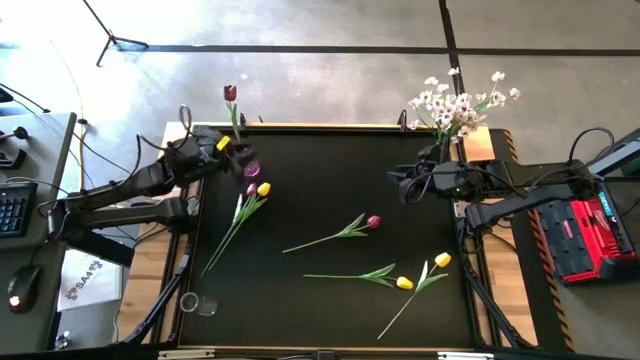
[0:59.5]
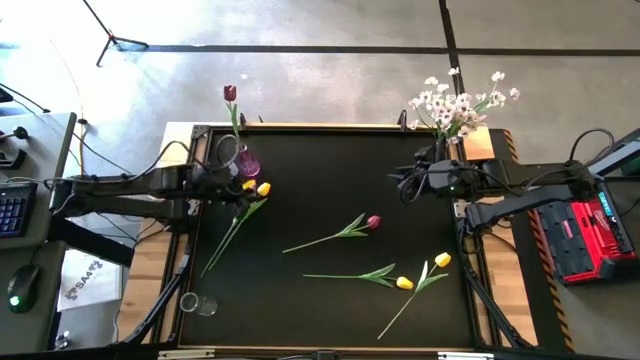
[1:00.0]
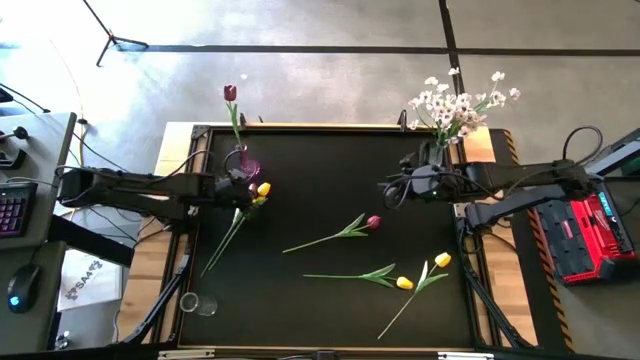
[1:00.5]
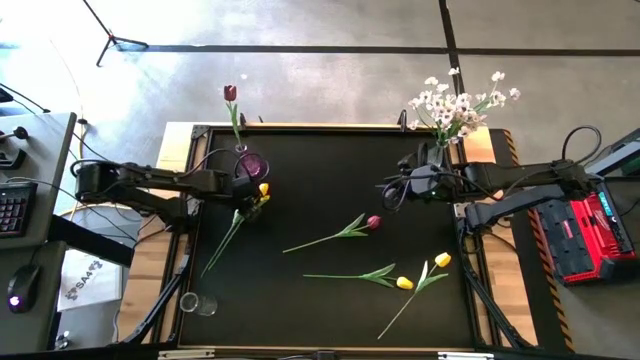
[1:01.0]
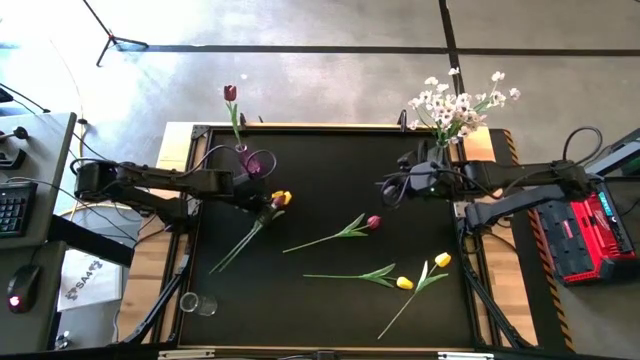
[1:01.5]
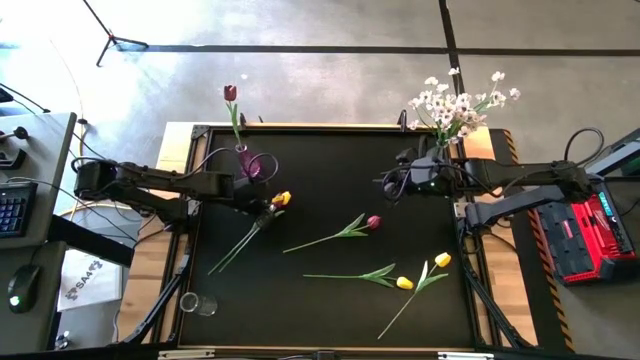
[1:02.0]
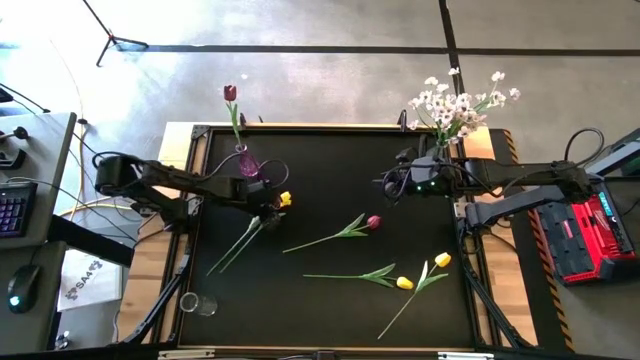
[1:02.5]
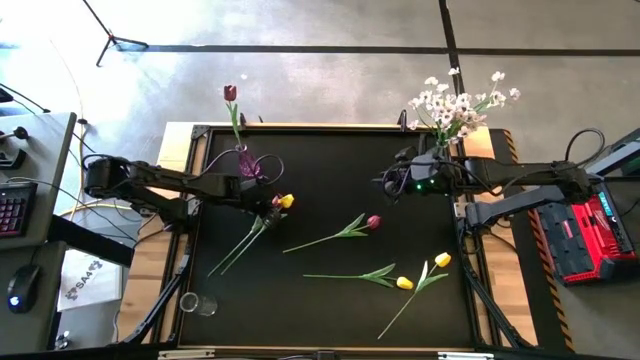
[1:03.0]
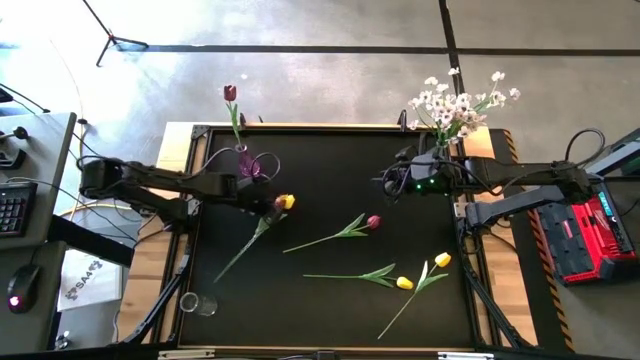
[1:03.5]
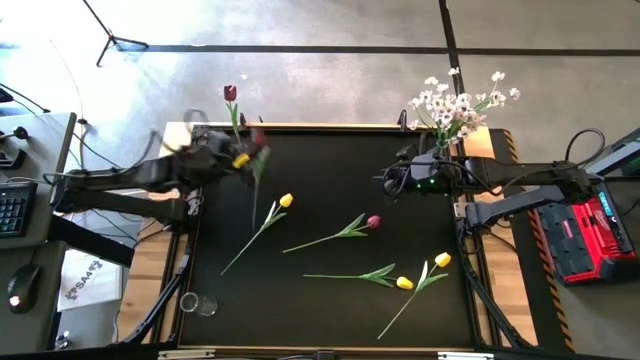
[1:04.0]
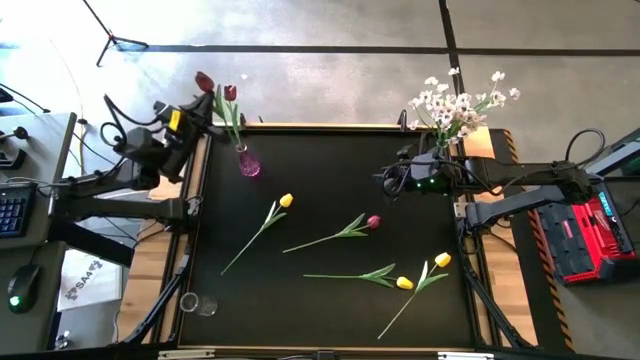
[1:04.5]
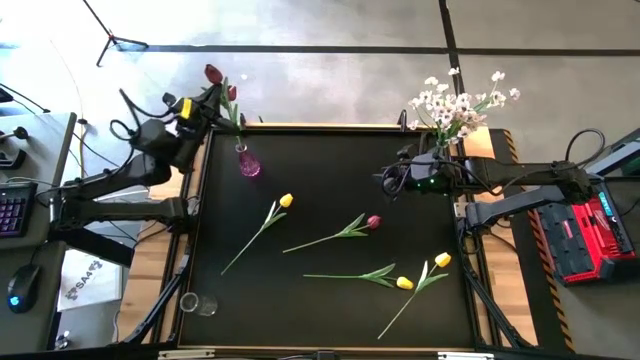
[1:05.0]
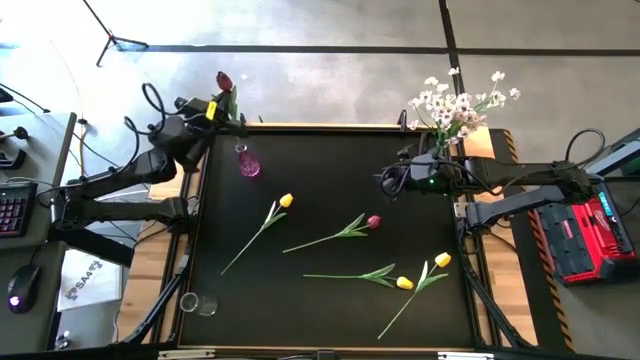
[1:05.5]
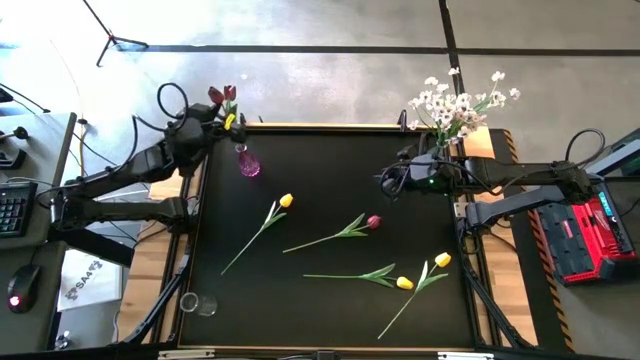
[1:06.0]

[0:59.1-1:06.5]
Task: Sort flowers into vase by color
Put the left maroon tulip flower into the top left purple vase

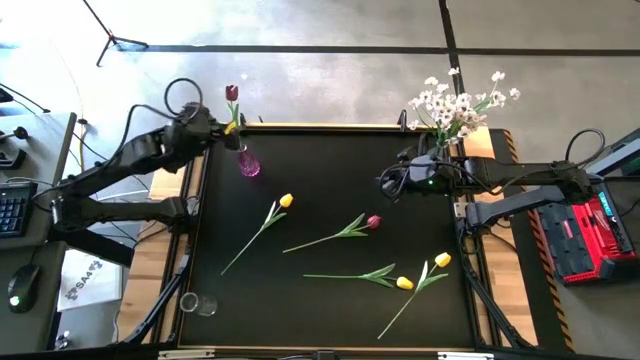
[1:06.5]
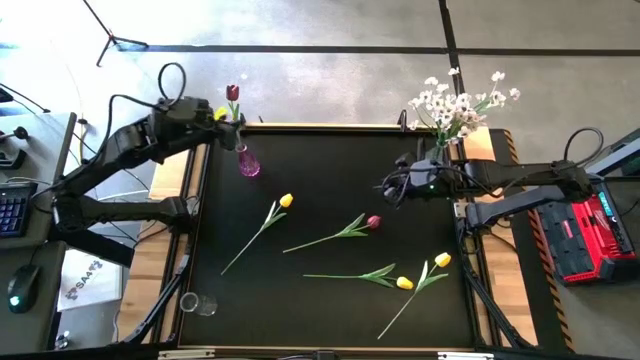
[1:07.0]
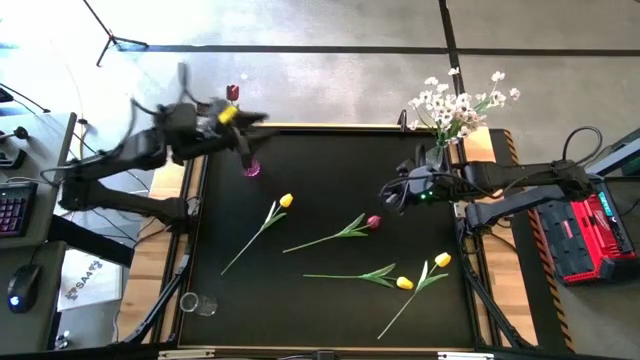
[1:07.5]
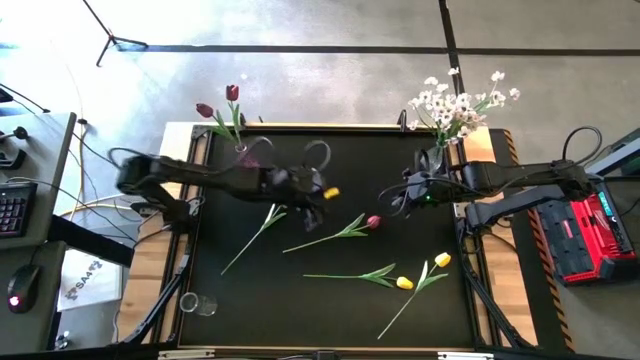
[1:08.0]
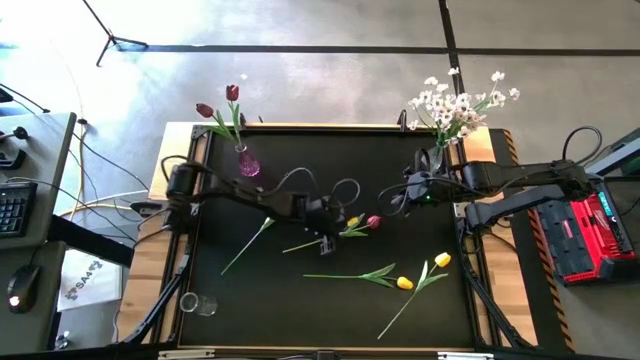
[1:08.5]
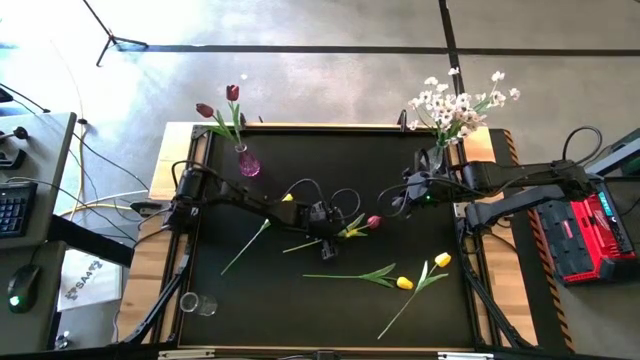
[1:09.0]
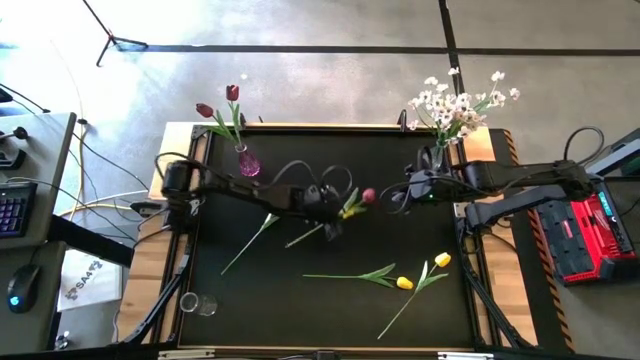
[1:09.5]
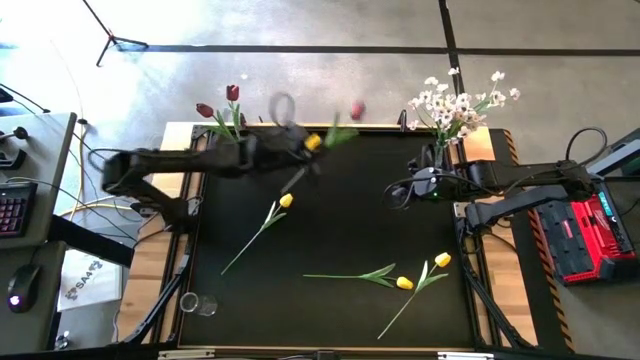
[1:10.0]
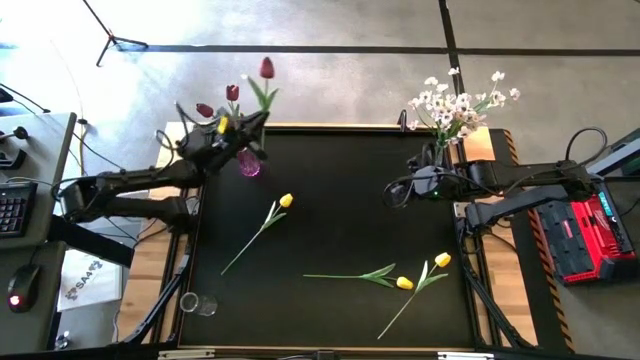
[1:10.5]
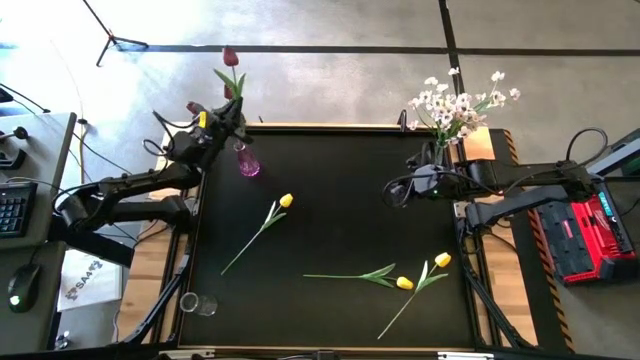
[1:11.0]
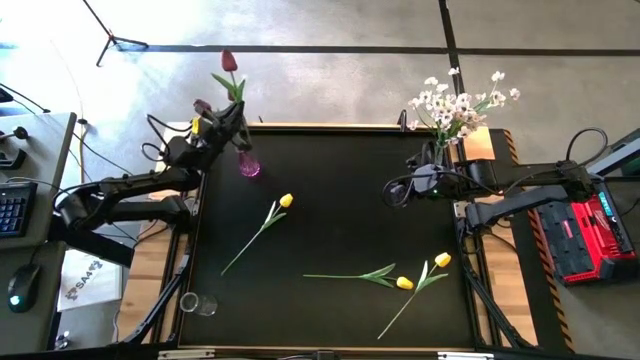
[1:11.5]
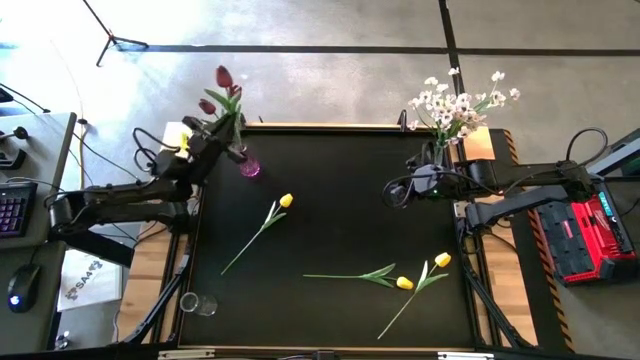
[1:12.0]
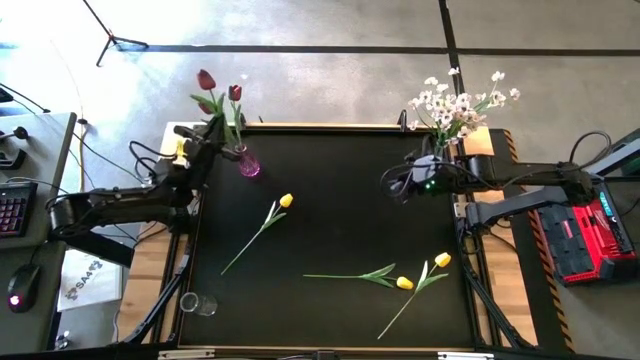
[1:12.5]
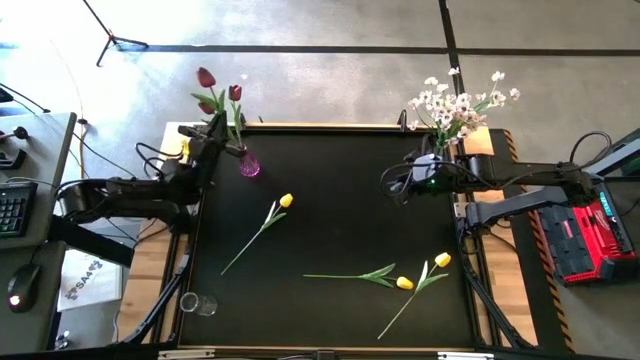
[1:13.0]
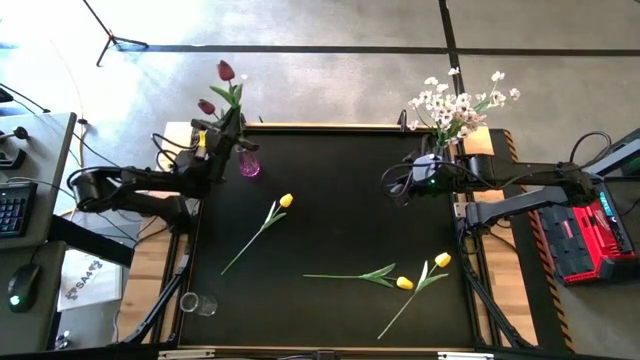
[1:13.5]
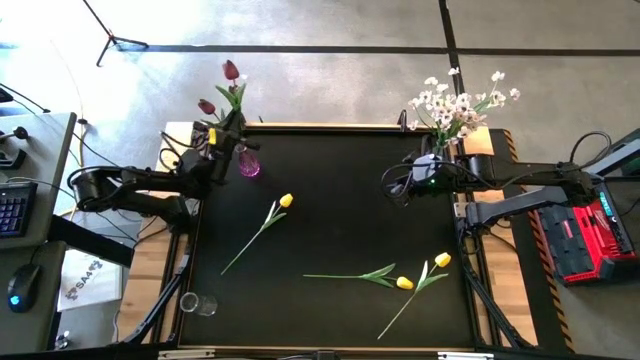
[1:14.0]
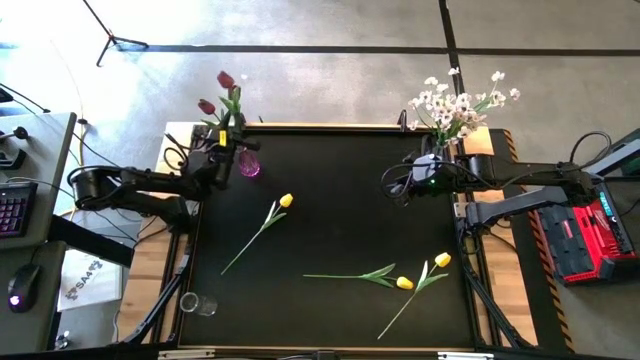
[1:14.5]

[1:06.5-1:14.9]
Put the maroon tulip flower into the top left purple vase

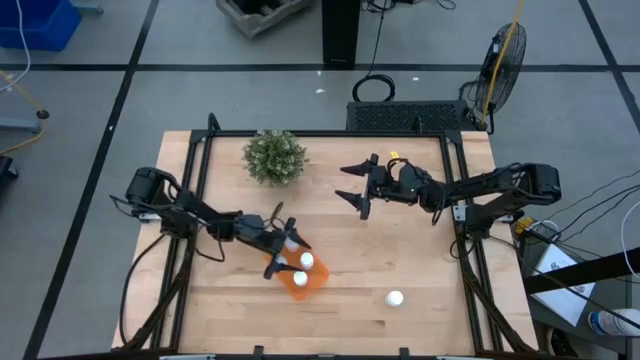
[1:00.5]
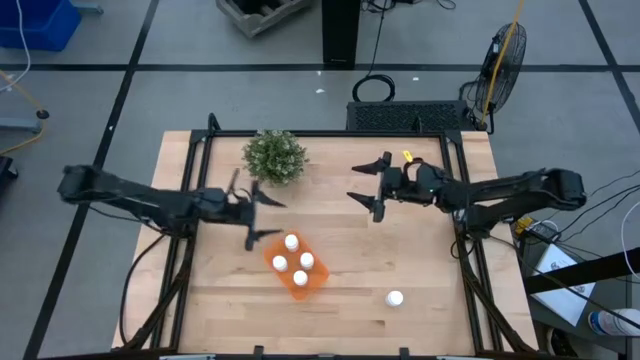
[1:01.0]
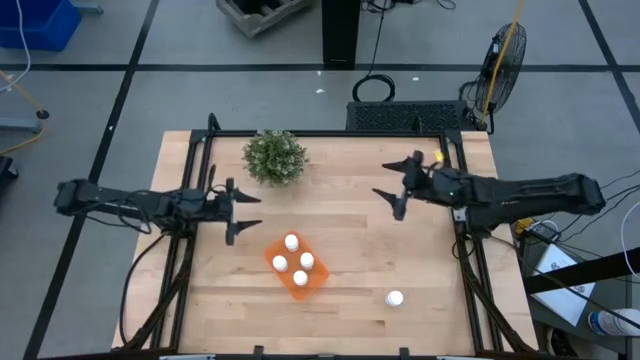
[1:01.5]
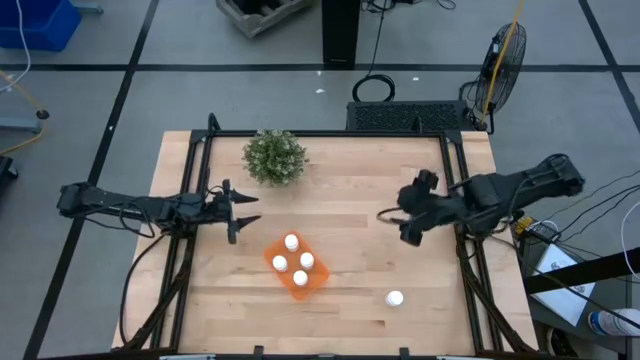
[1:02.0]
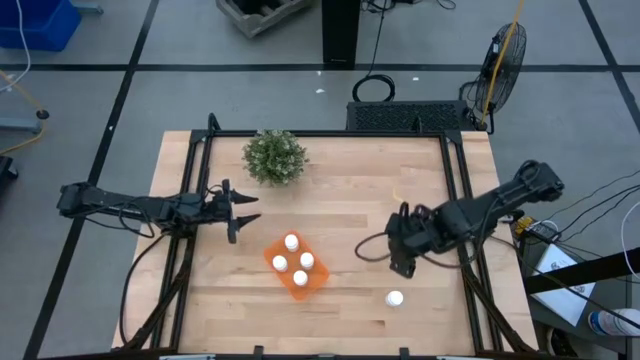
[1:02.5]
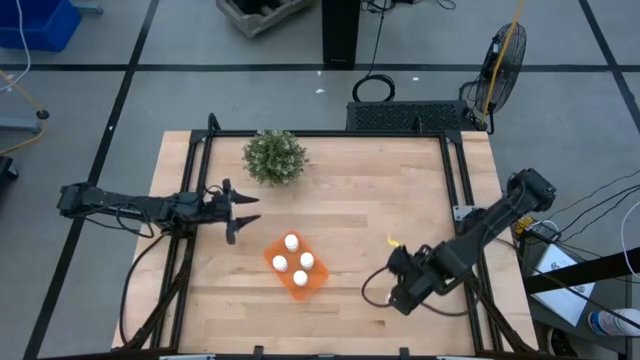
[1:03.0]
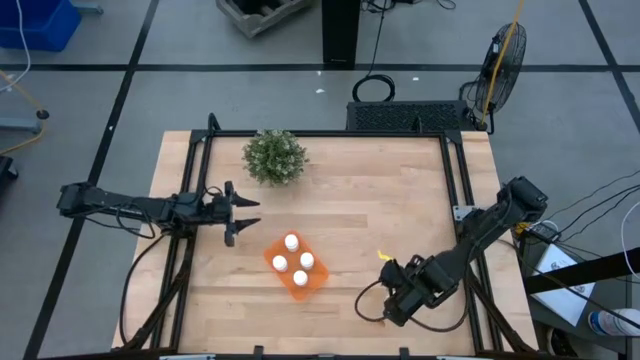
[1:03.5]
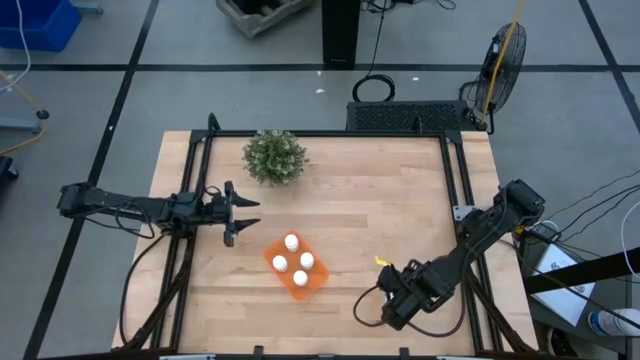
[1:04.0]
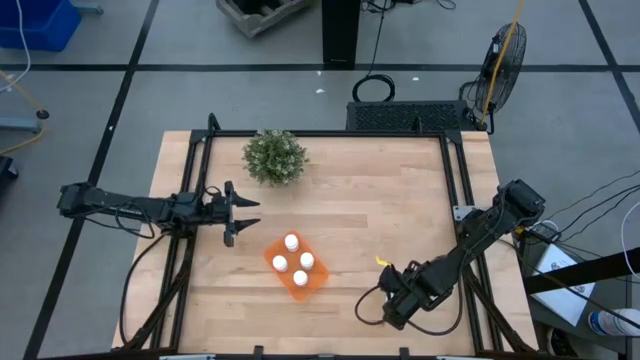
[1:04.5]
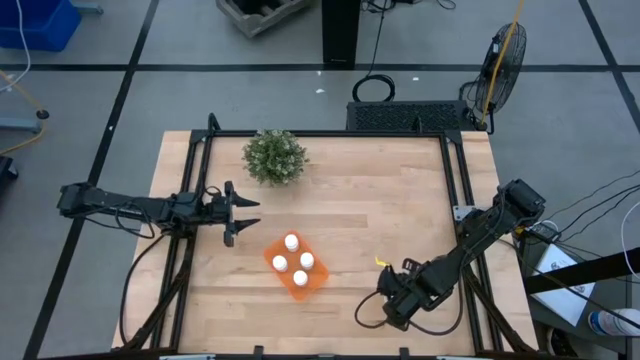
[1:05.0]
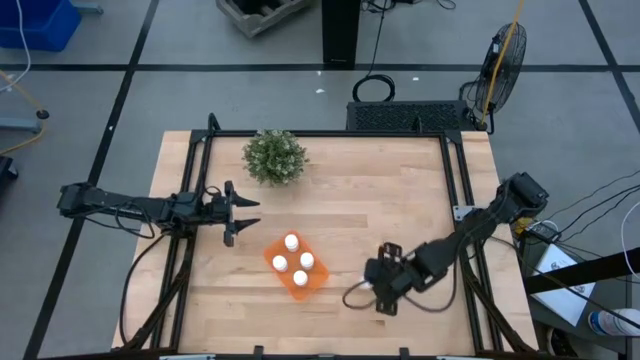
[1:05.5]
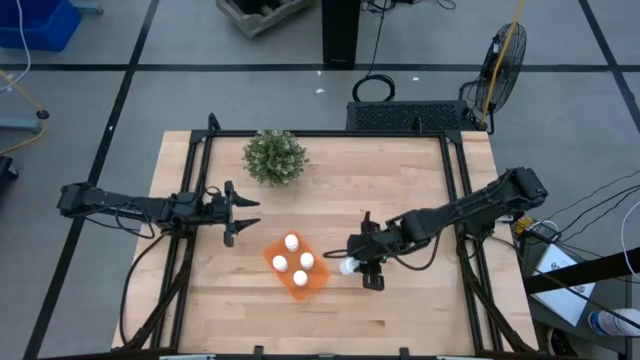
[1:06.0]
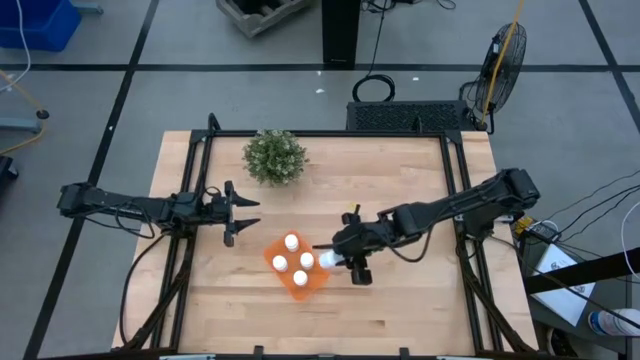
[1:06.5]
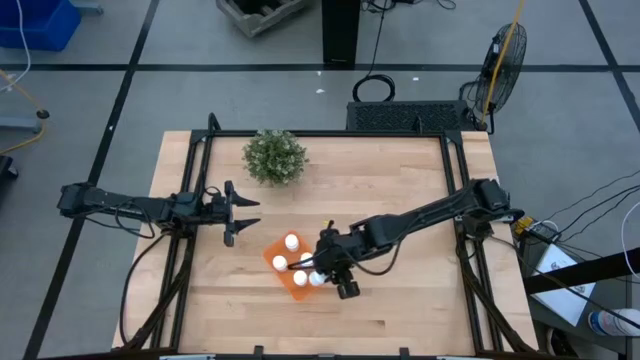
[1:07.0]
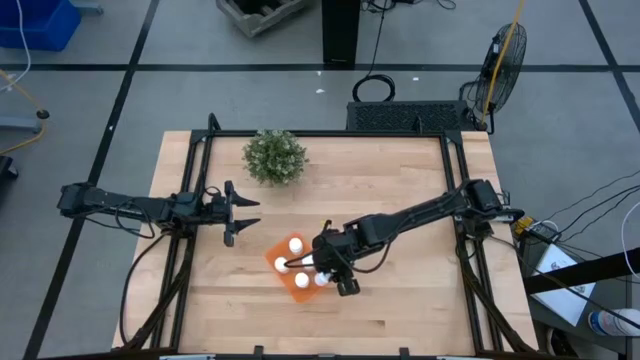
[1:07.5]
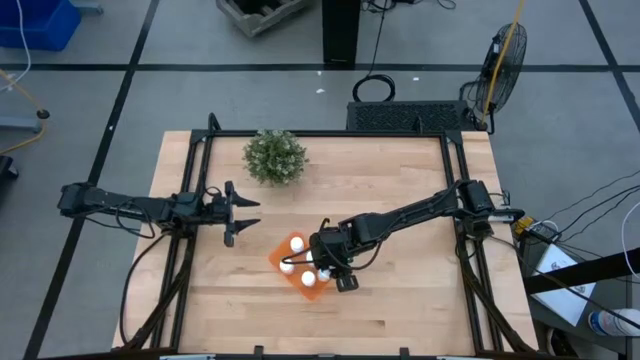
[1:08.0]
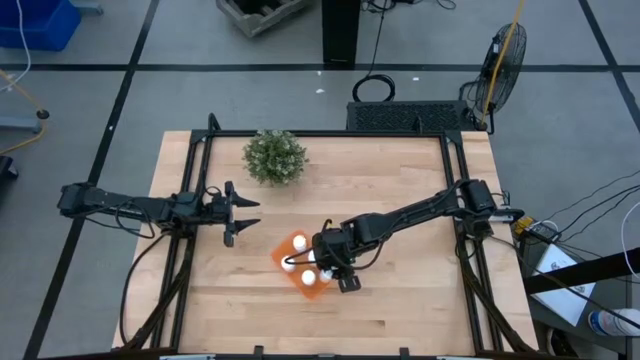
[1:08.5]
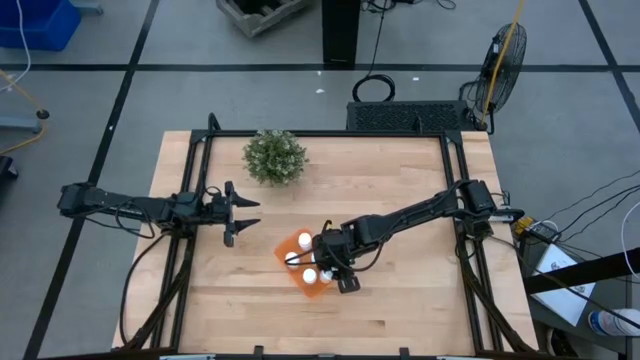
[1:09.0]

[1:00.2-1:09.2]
Task: Pick and place pill bottles into a basket
Put the white medicine bottle into the orange bin
